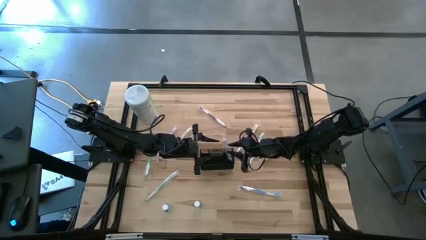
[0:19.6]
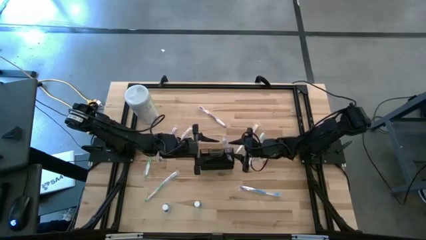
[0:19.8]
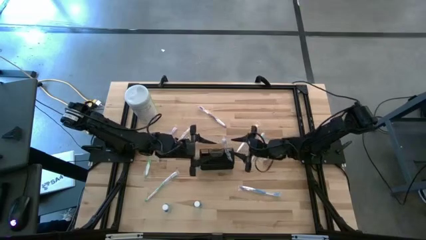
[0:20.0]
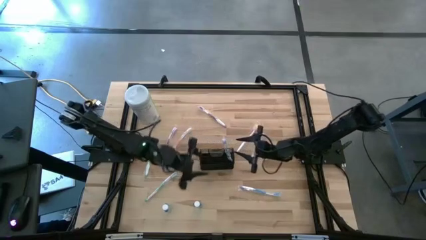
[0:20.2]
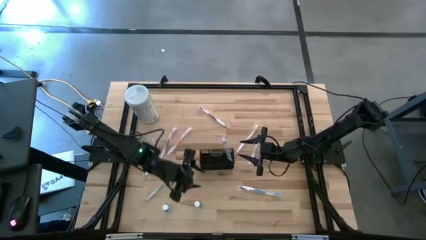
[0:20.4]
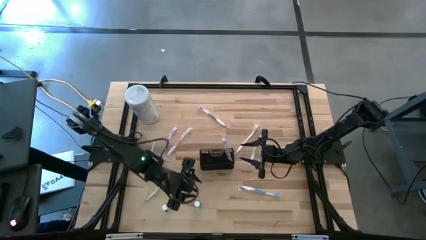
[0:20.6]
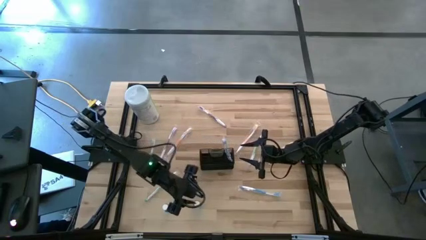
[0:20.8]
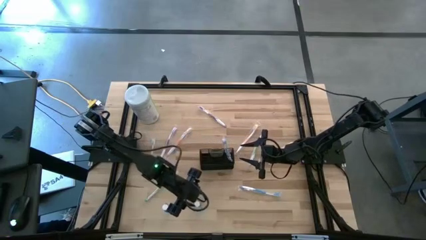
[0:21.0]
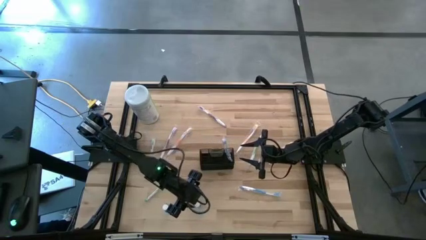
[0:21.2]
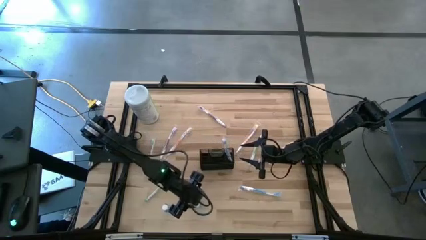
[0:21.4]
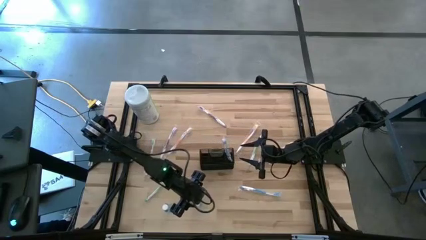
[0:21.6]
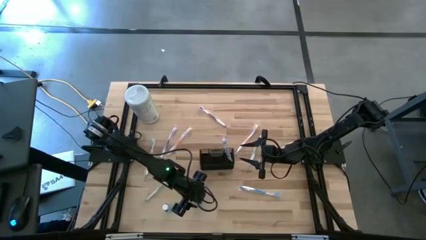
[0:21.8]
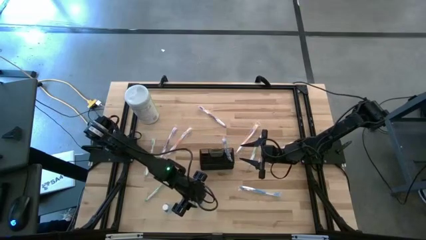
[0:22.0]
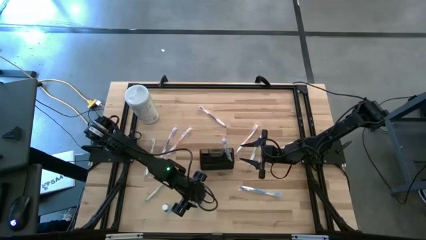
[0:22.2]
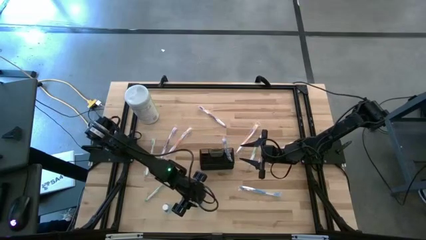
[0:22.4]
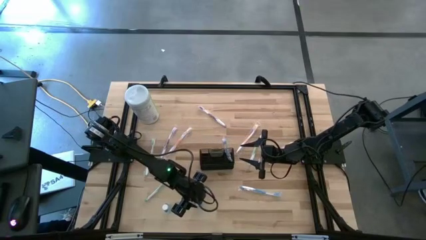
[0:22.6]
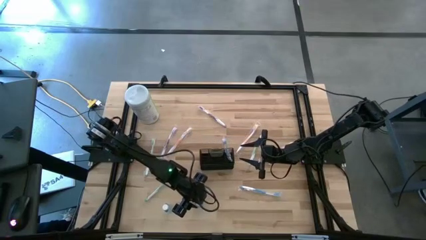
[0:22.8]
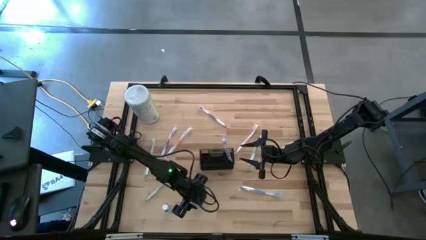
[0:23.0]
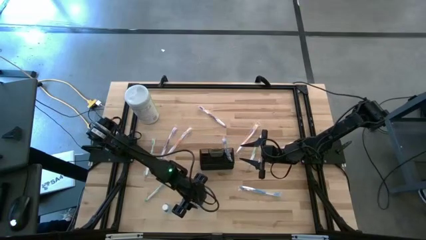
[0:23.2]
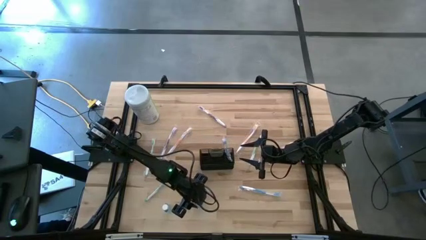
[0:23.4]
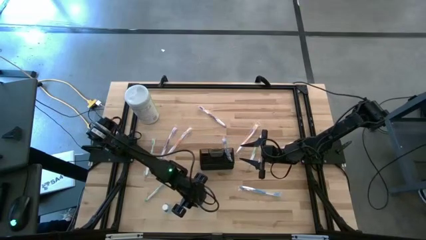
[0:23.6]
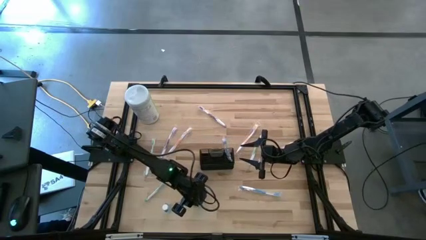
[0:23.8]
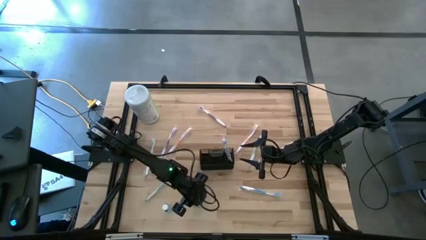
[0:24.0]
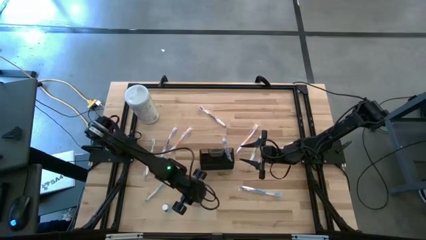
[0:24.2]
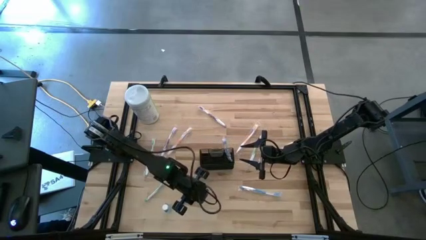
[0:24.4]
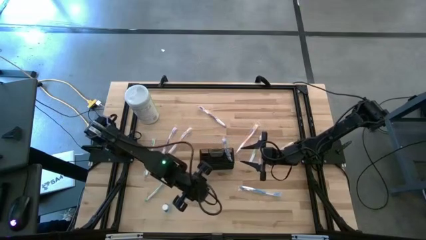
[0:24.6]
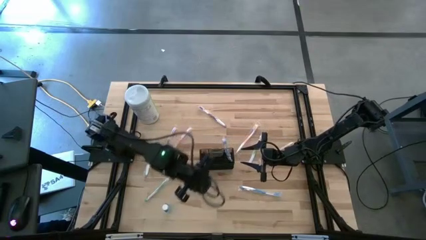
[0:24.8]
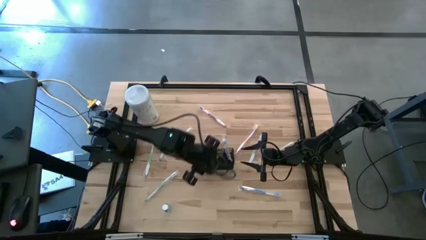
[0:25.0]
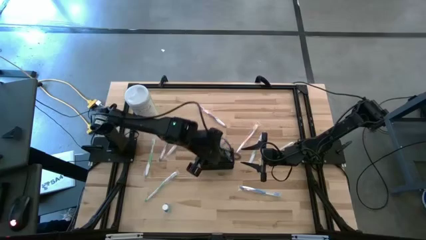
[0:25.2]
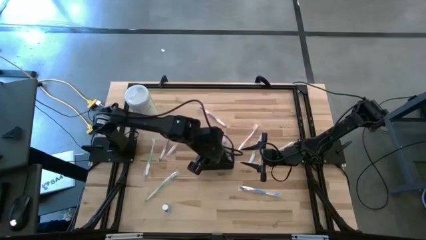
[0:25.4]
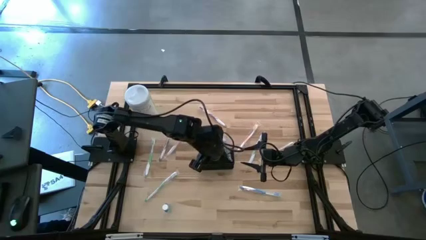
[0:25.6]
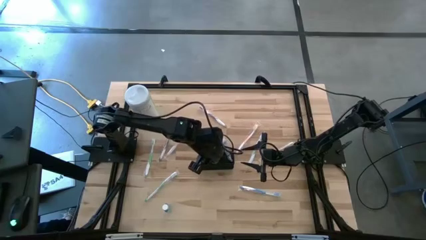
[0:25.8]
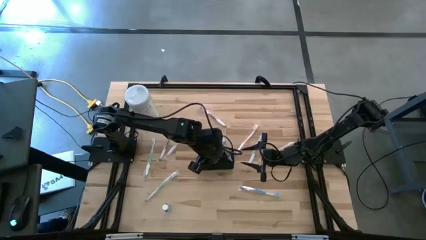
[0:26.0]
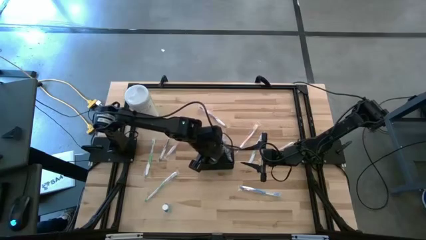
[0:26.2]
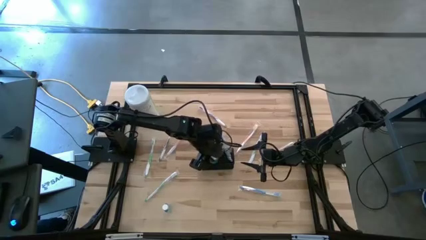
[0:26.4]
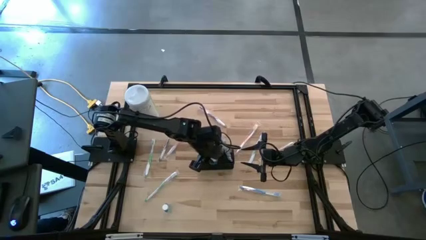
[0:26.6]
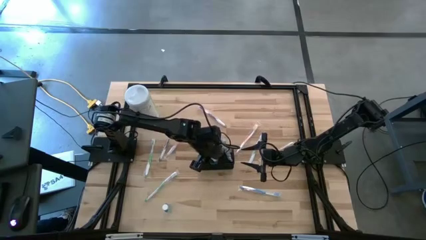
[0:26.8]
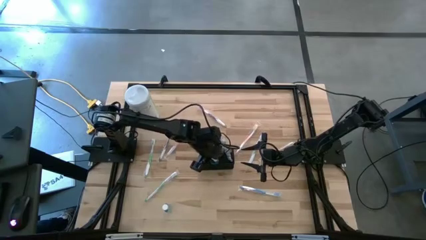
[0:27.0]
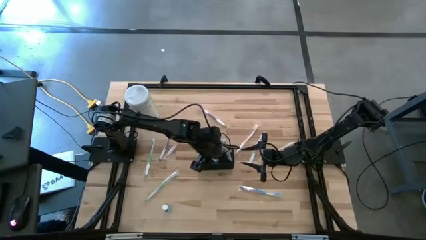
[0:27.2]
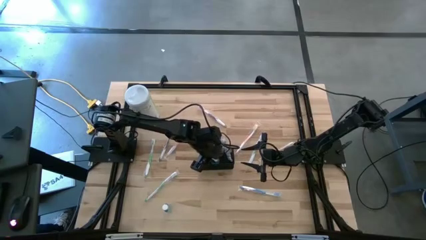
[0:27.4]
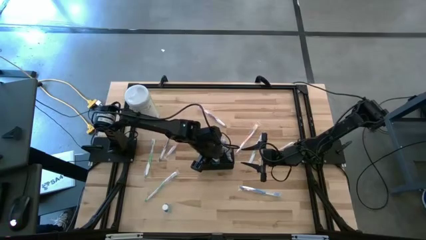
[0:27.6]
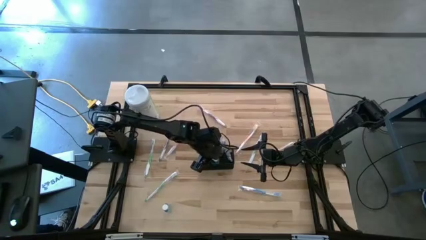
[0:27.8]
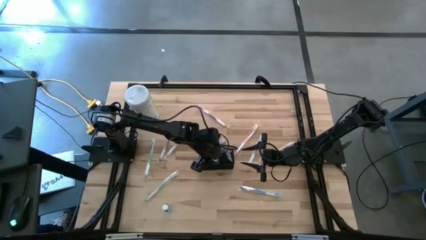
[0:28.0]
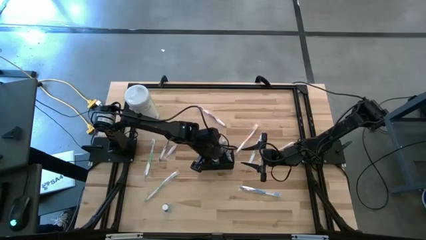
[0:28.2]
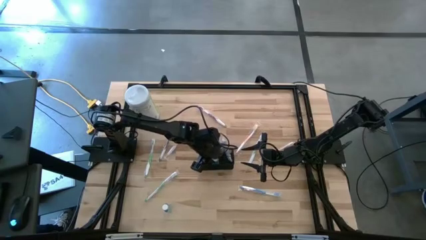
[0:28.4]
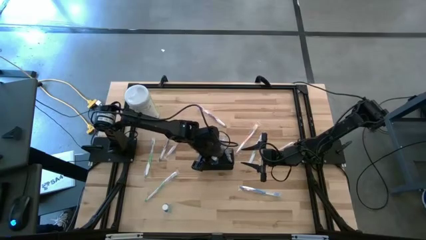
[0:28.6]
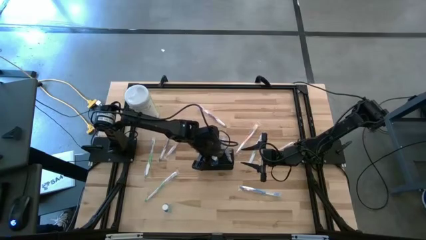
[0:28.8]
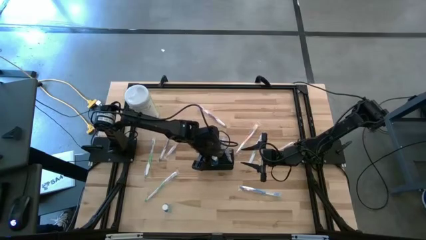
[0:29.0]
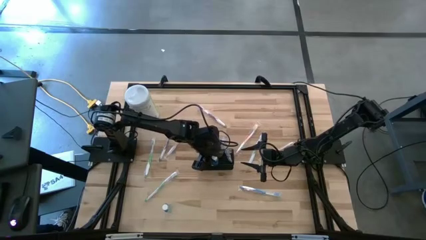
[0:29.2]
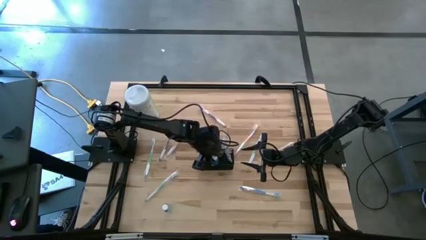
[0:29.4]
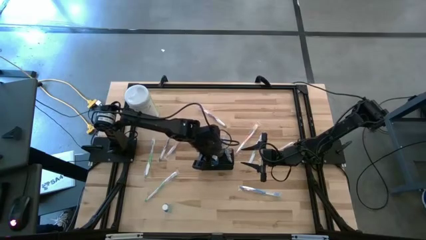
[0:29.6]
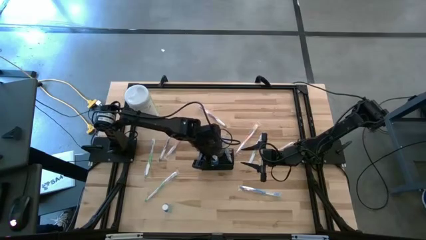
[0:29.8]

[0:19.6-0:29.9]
Task: Pick & Place toothbrushing station
Put the right blue mouthwash into the black wire organizer

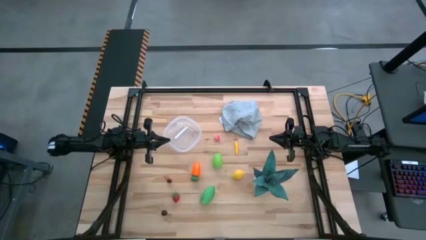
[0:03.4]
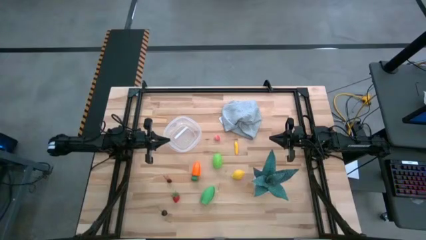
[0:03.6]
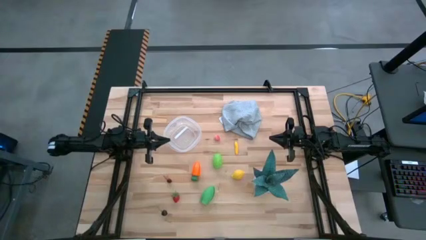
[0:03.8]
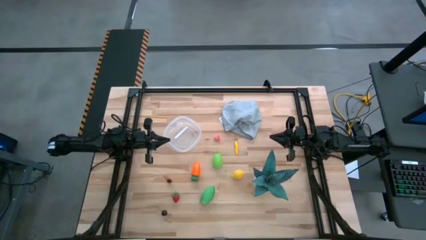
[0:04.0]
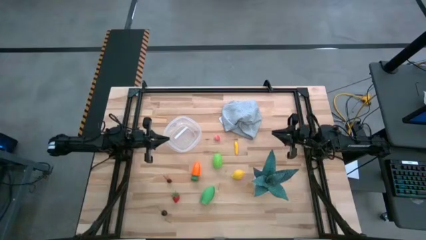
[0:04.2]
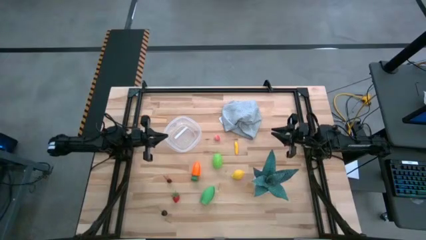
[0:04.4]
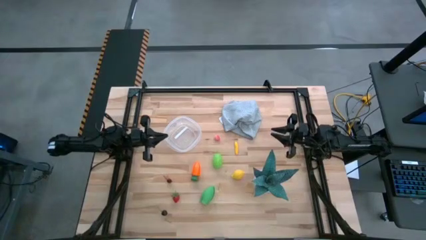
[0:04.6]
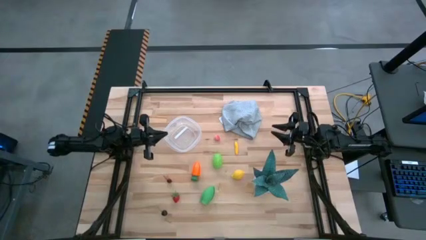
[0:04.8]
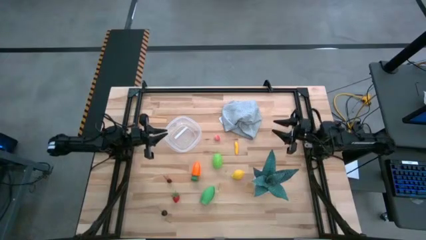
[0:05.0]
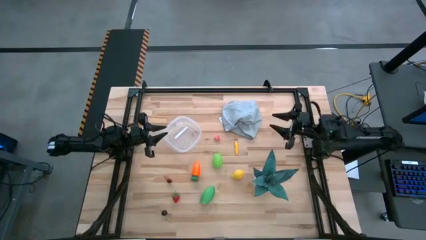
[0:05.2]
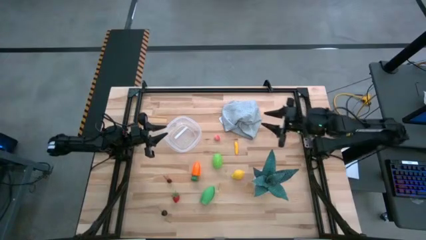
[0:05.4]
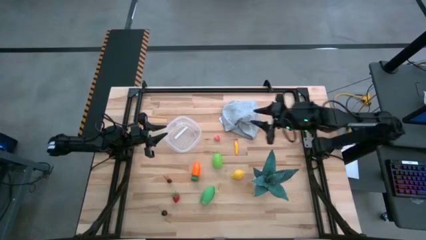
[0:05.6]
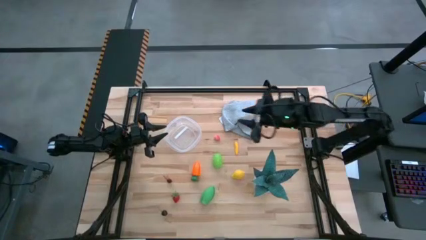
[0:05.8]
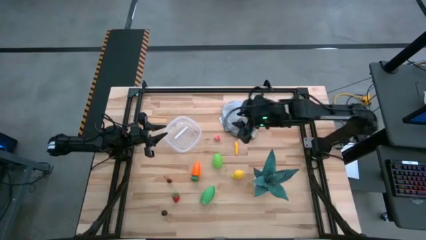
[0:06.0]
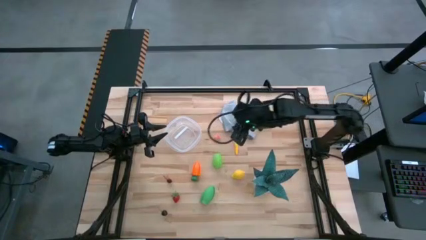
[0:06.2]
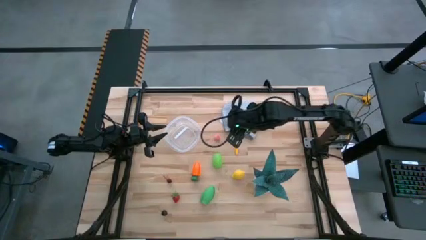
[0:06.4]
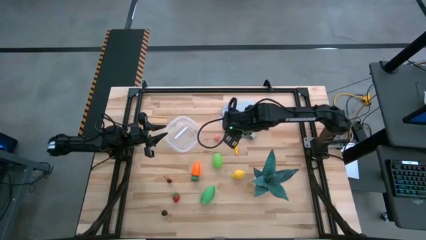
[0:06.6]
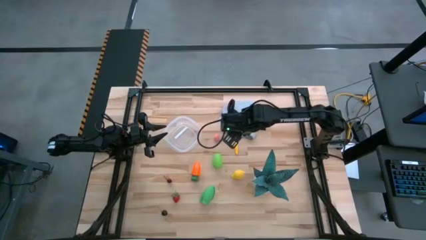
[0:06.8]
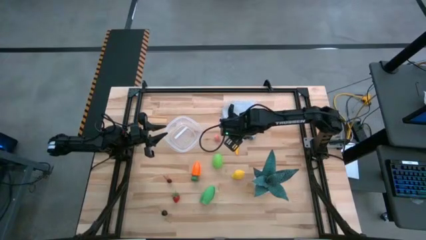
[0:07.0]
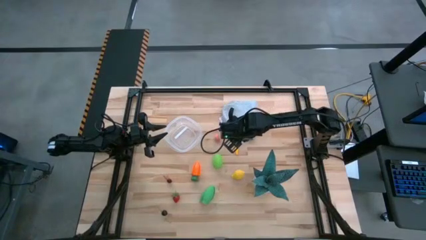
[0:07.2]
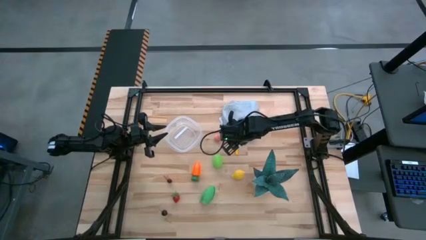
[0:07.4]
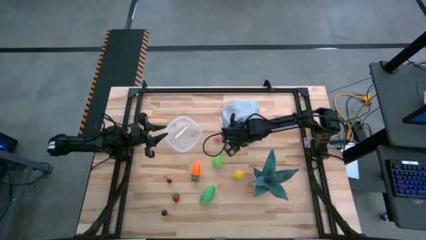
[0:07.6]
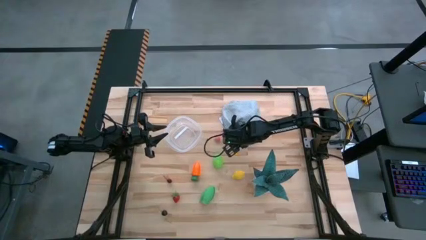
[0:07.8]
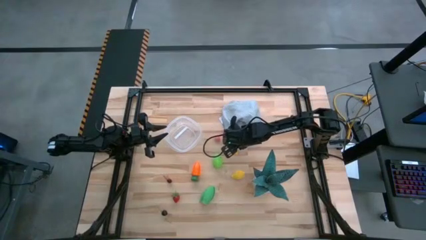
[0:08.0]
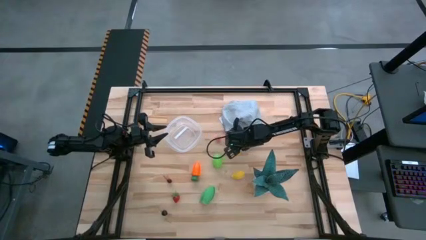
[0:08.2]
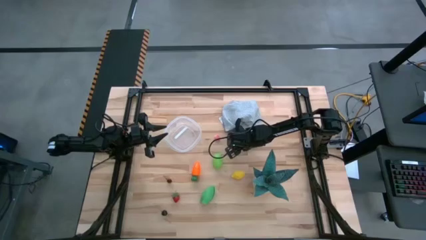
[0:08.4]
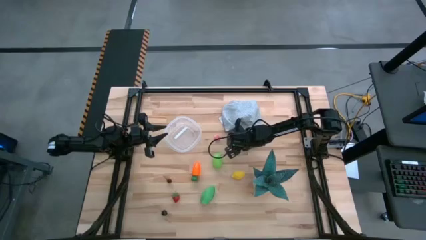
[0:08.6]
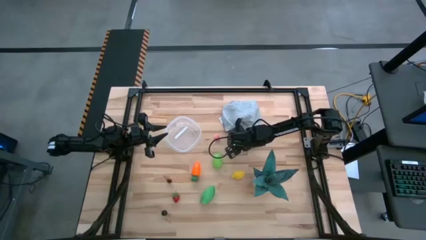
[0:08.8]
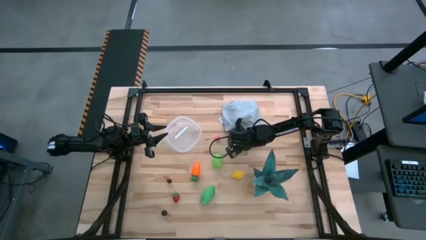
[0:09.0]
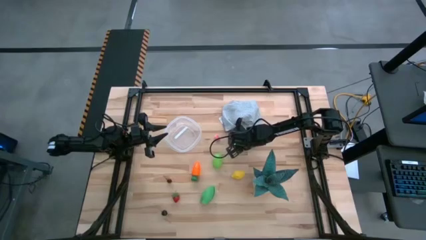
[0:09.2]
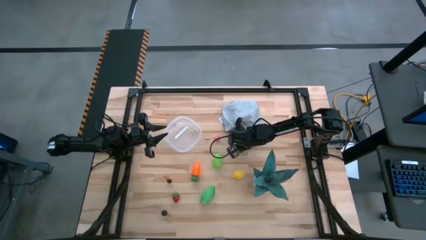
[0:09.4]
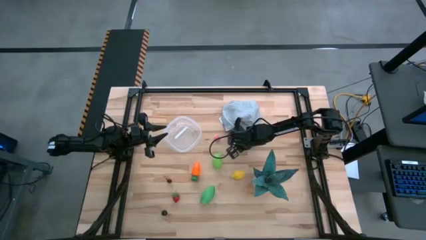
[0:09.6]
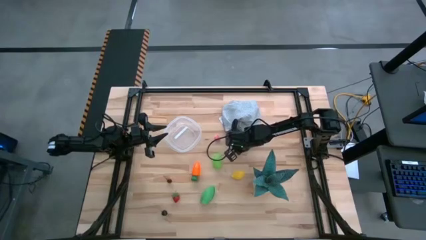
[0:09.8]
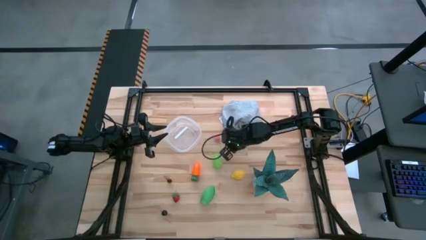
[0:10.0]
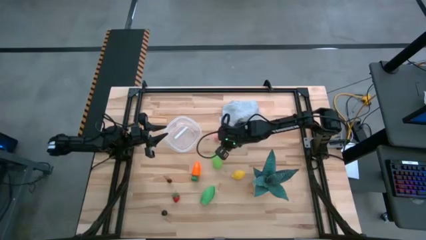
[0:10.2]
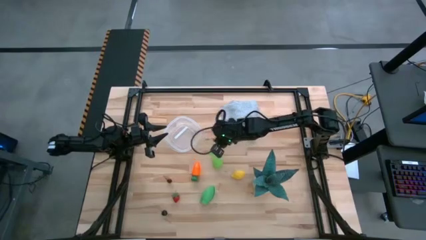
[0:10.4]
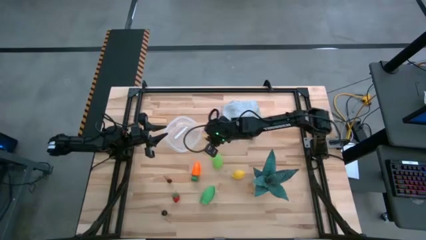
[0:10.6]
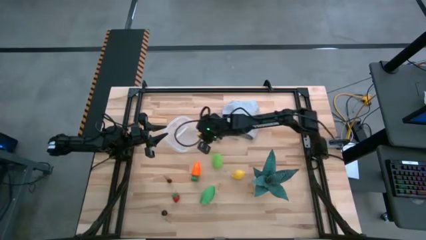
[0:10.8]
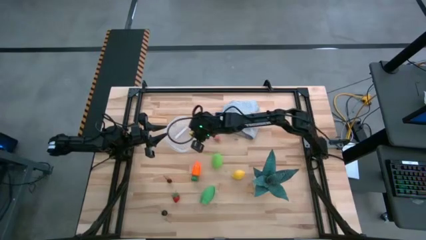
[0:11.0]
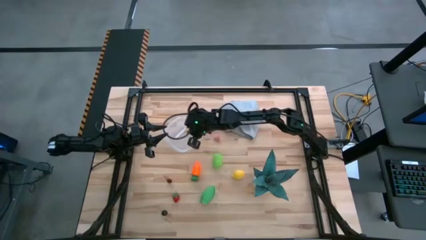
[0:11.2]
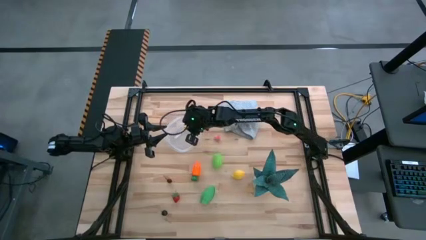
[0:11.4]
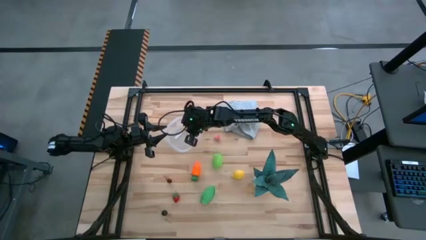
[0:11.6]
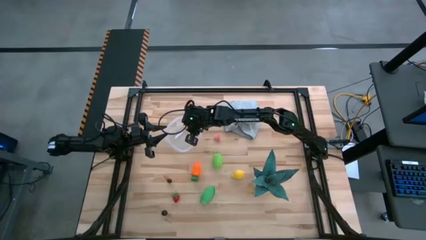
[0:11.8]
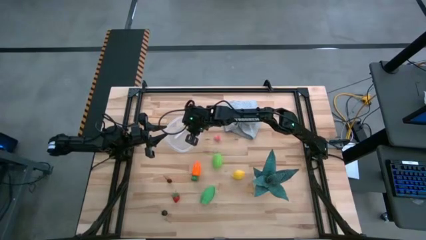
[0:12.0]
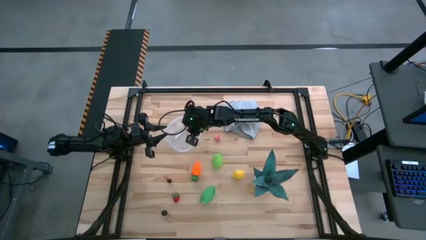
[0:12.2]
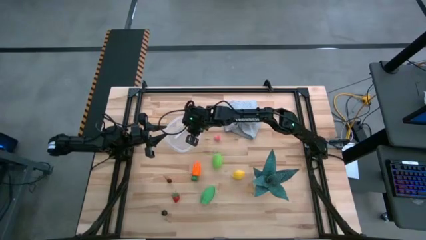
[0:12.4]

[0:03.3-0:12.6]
Task: Pick and placing Produce into tupperware
Put the yellow corn into the transparent container
